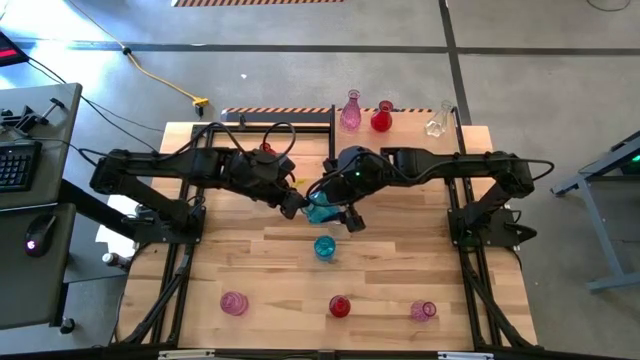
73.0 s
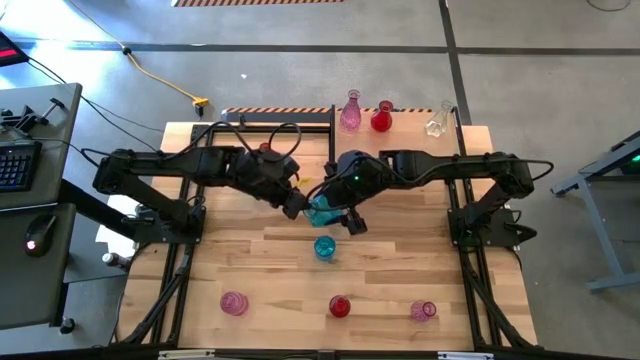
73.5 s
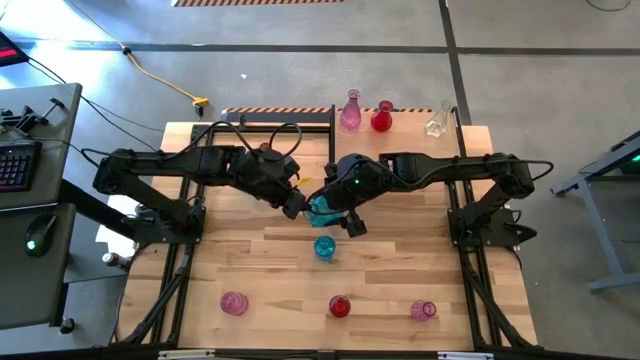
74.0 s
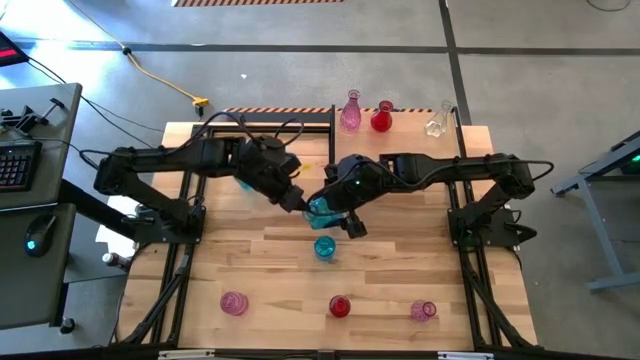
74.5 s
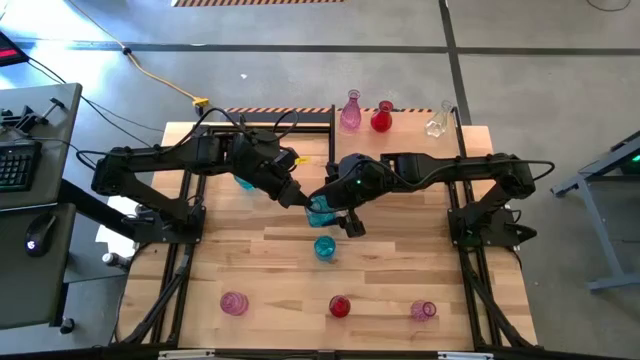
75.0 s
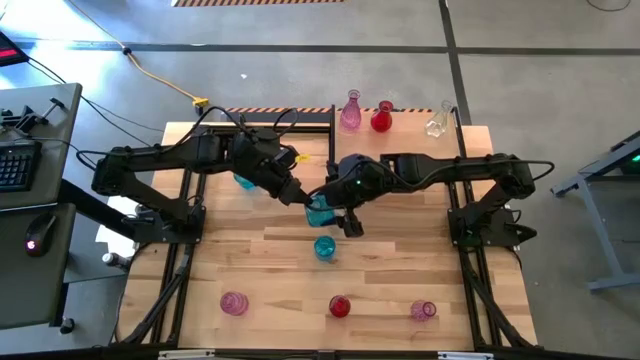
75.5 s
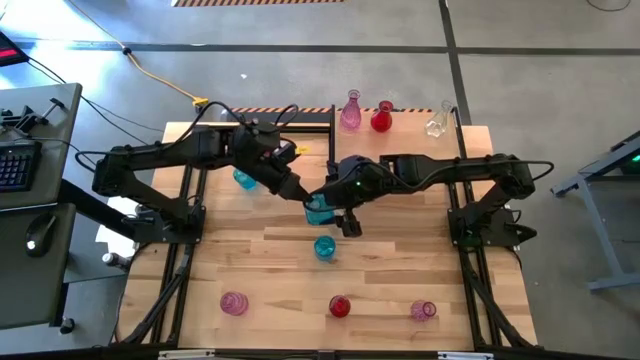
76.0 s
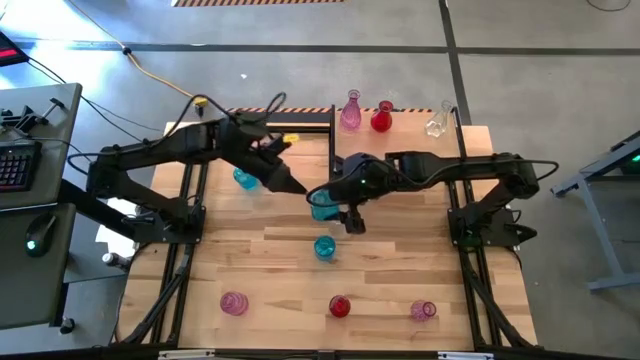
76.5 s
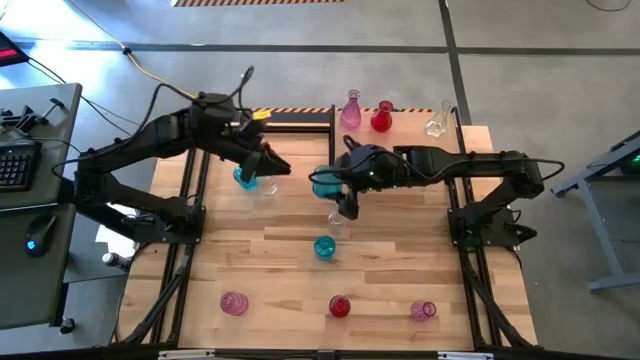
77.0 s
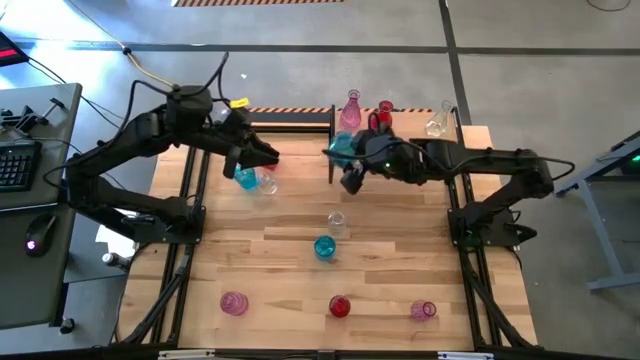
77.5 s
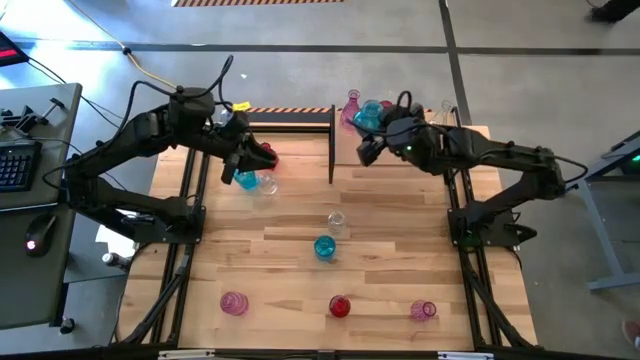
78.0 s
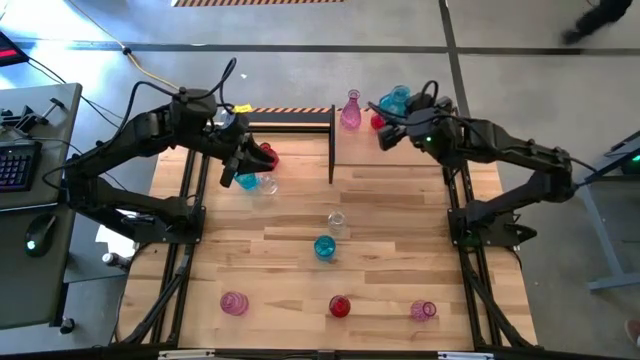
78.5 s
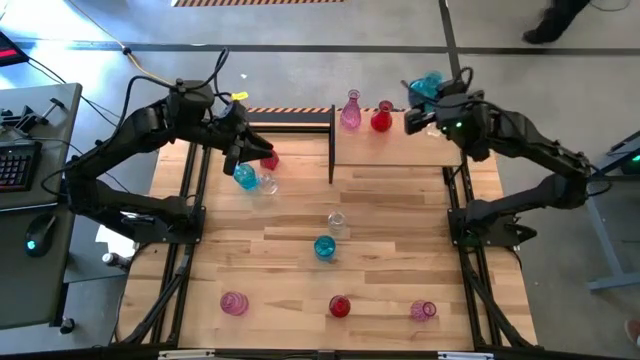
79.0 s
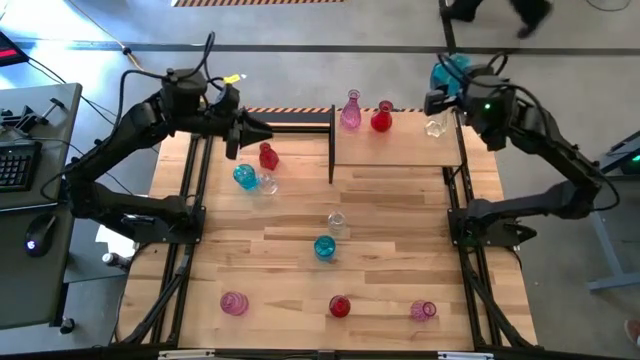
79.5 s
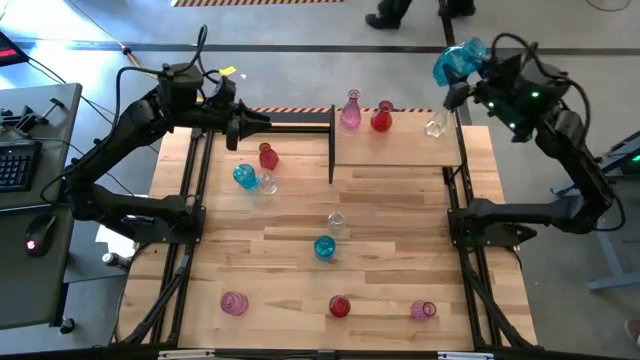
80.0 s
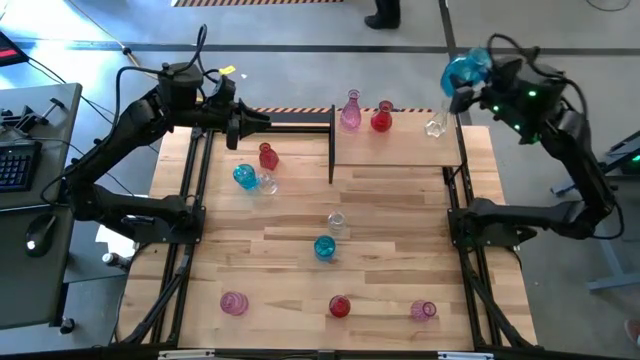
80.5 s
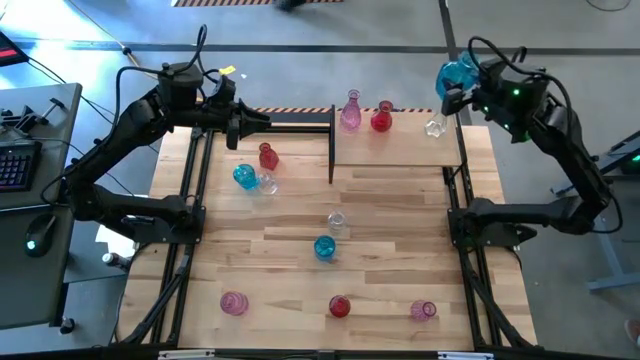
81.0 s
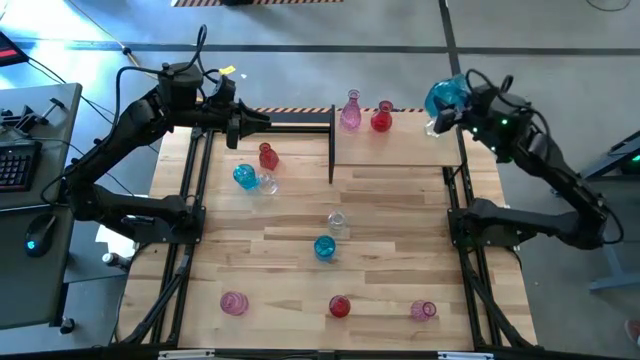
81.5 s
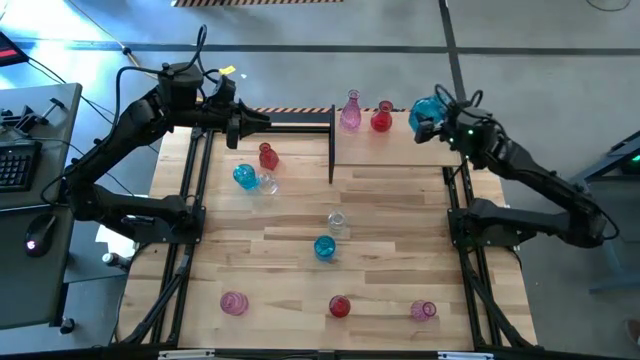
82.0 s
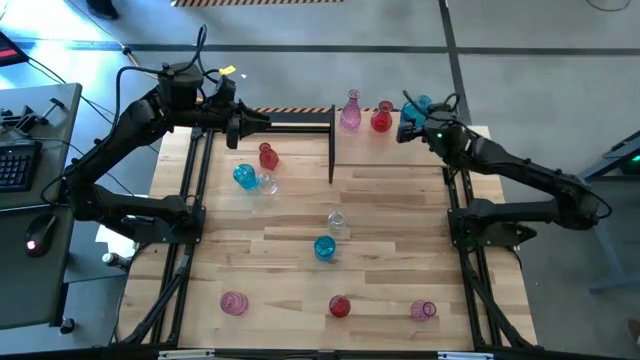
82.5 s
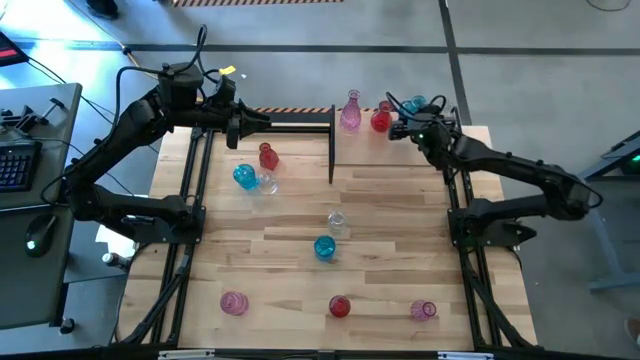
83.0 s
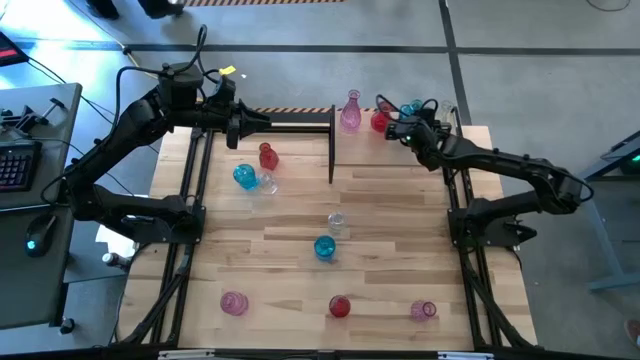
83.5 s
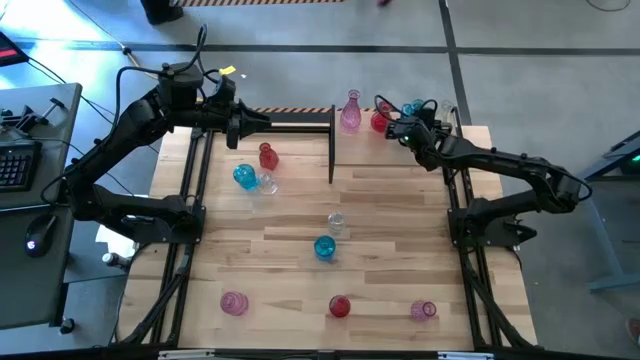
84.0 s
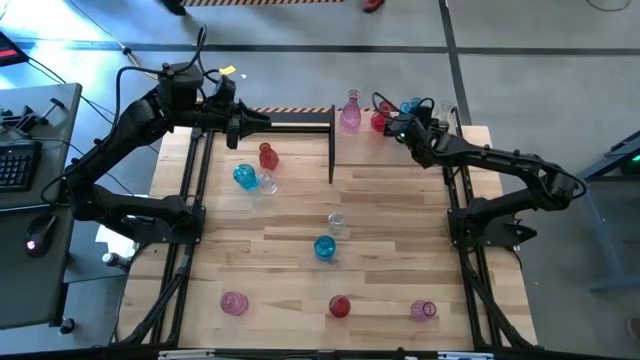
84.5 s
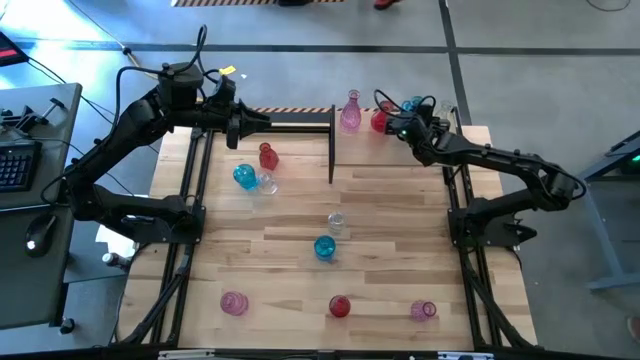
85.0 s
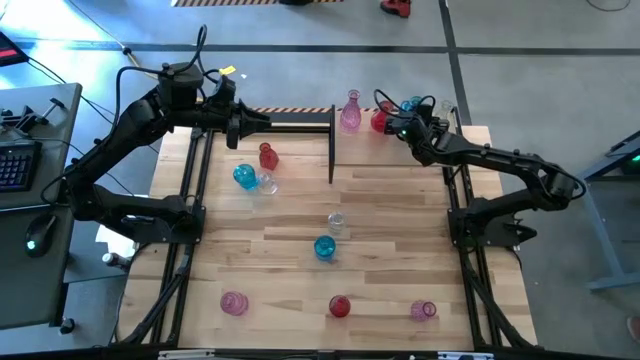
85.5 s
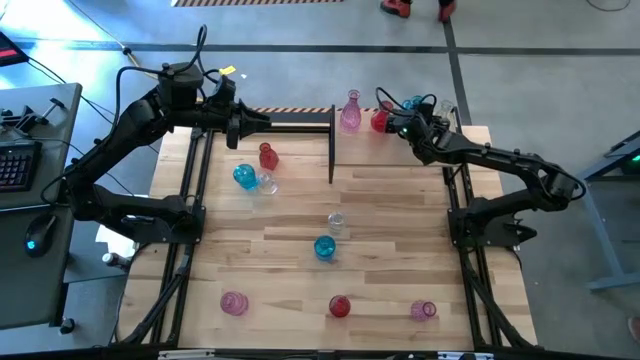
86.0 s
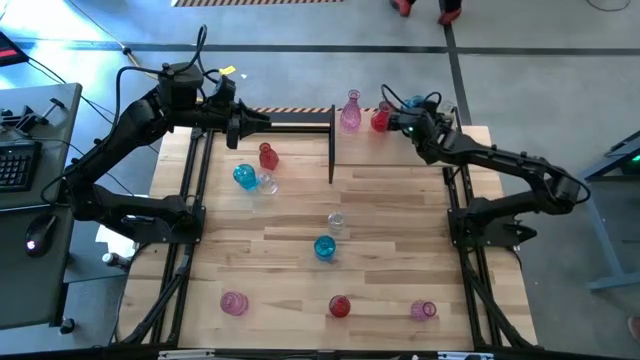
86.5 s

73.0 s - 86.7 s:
Task: sort vases onto shelf
Put the bottom left blue vase on the shelf

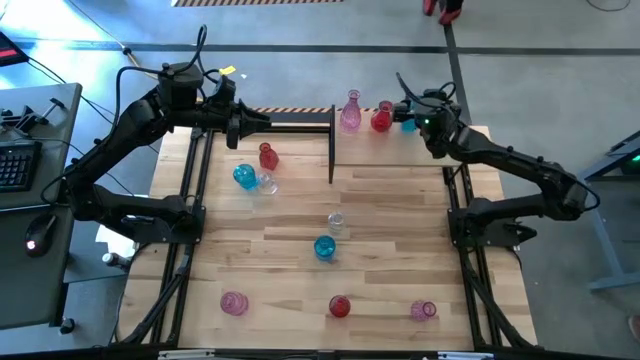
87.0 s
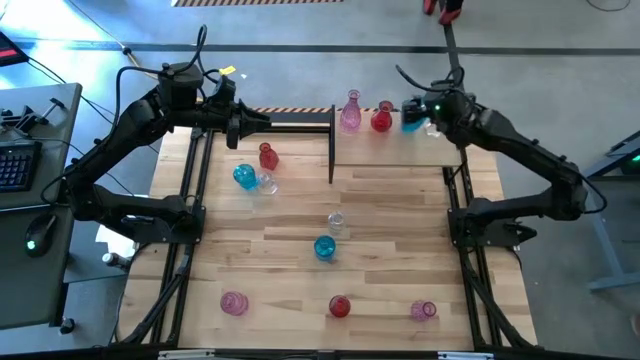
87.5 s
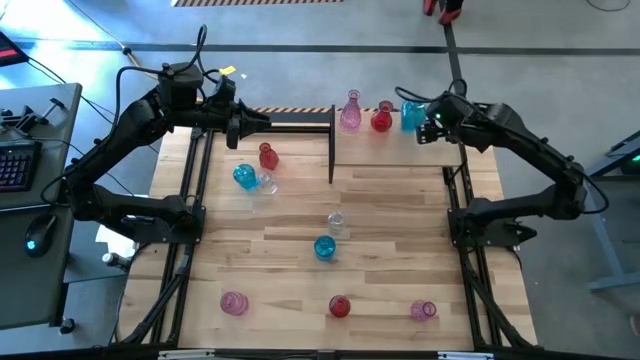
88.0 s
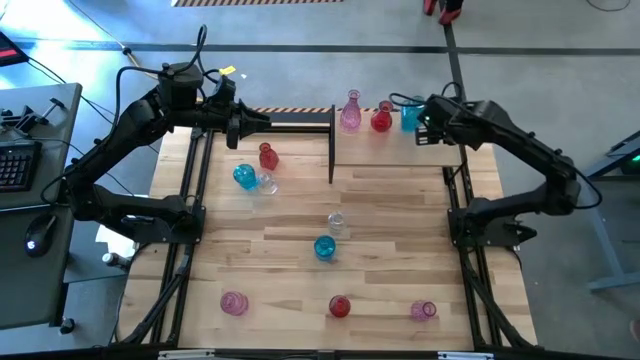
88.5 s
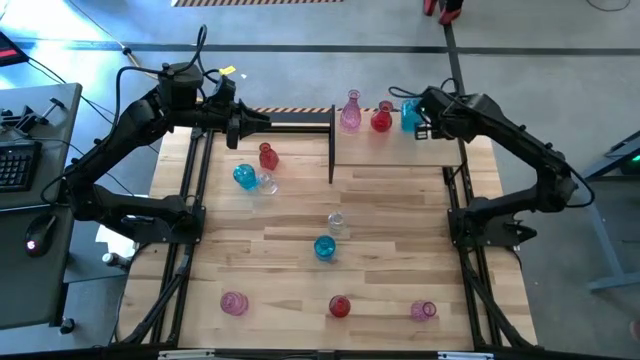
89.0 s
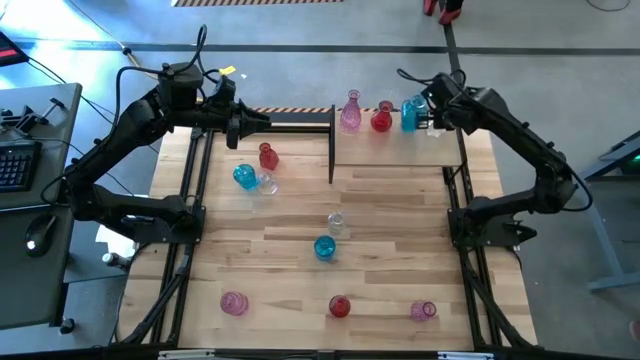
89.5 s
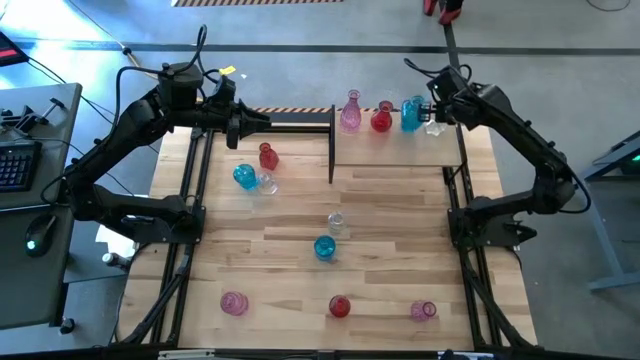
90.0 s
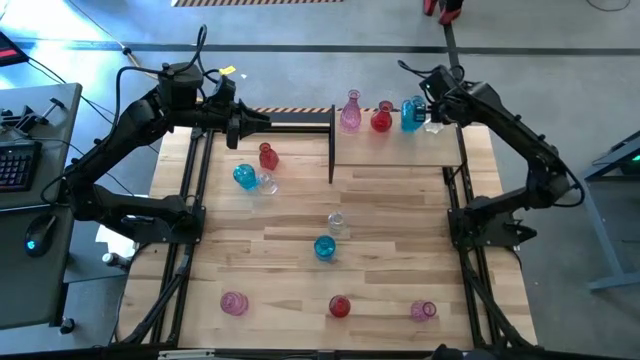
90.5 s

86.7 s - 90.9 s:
Adjust the transparent vase on the shelf

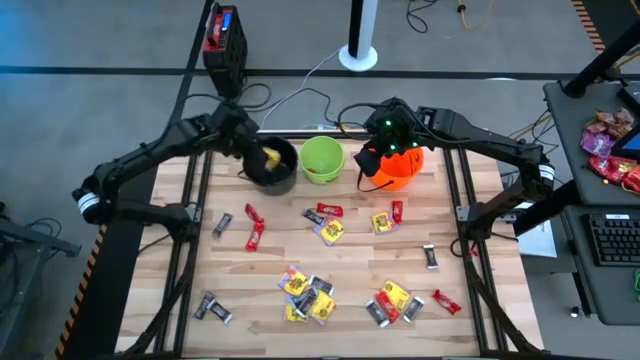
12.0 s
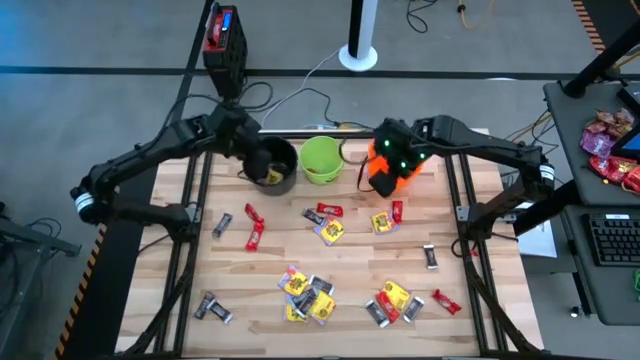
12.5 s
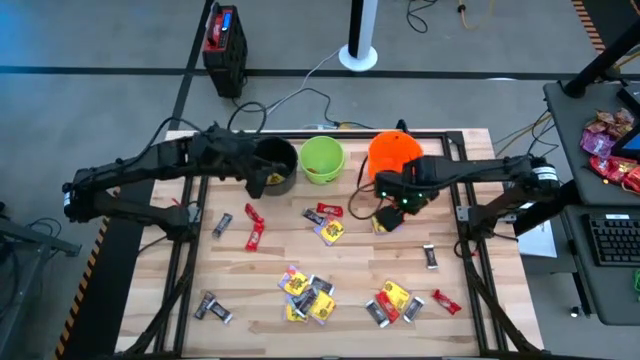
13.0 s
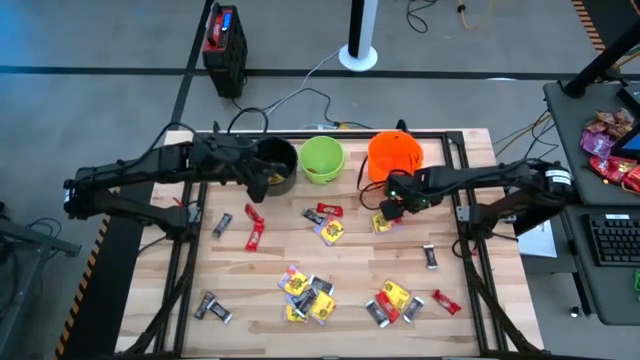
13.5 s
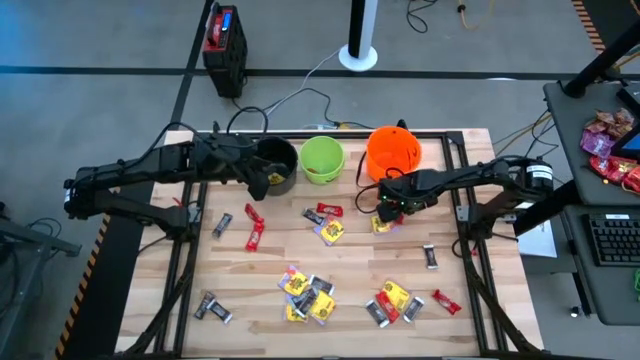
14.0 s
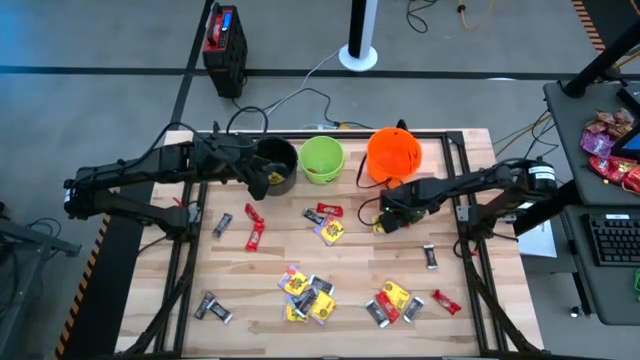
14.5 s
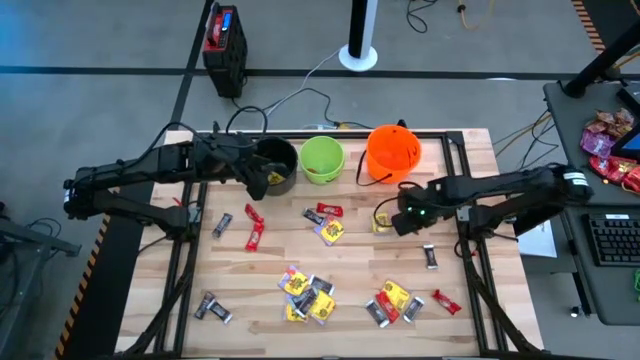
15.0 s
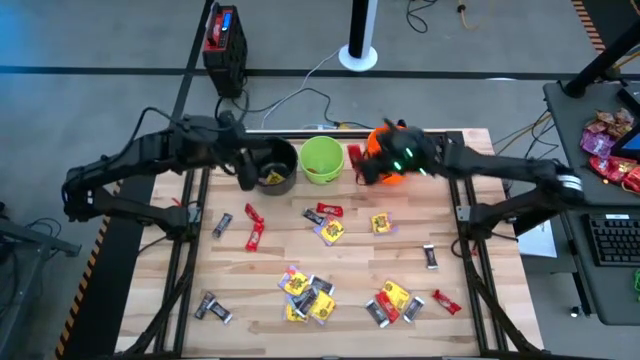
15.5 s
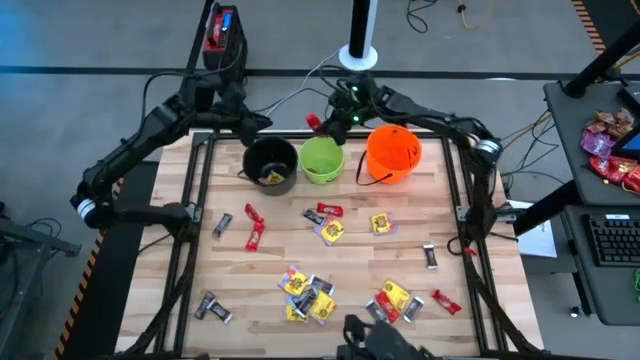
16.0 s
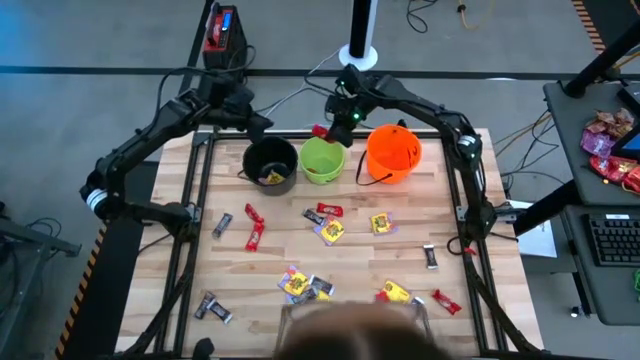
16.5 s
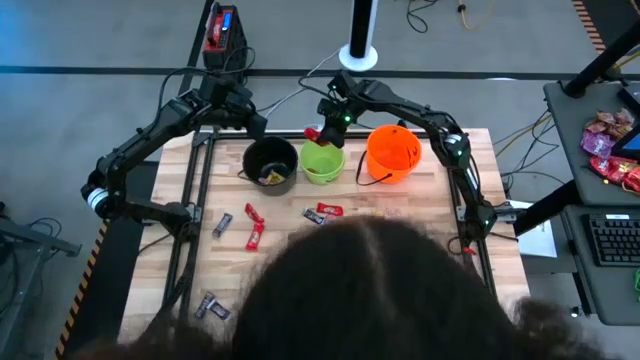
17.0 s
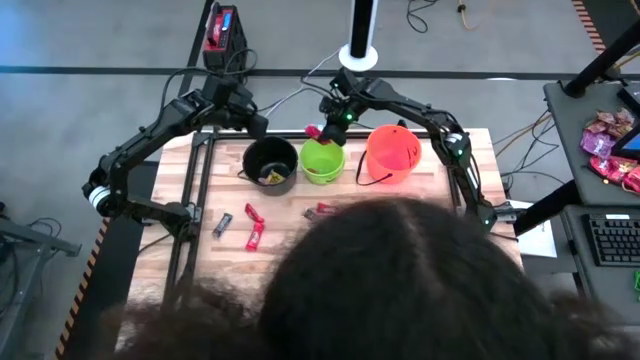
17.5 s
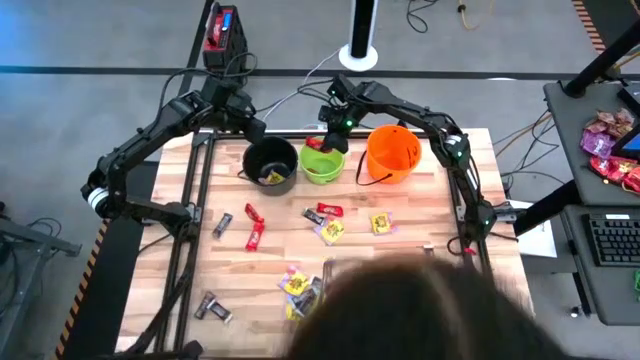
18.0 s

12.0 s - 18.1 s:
Task: Sort candy by brand, put in halloween buckets
Put the red chocolate bar into the green bucket
